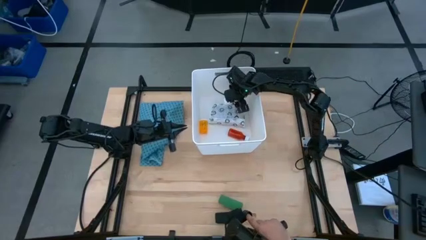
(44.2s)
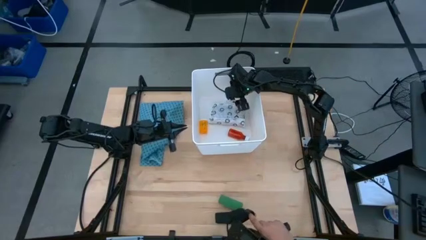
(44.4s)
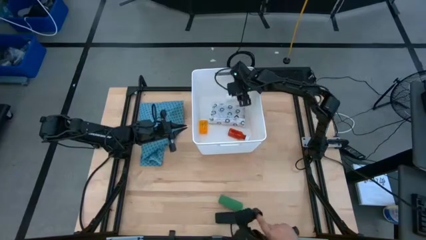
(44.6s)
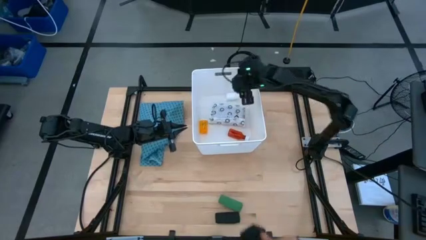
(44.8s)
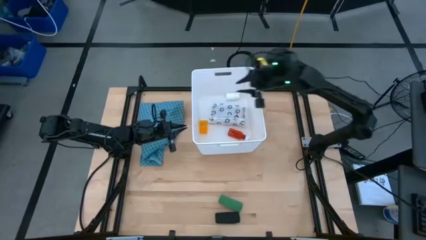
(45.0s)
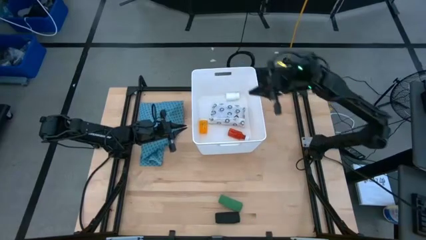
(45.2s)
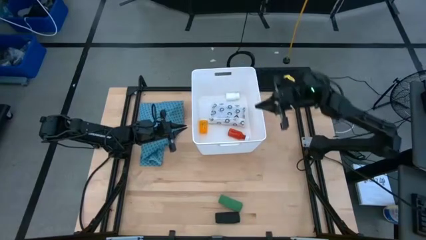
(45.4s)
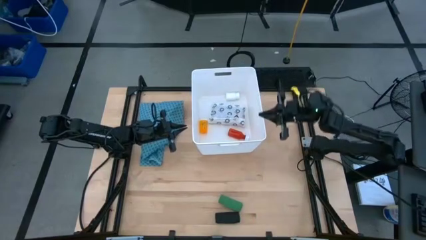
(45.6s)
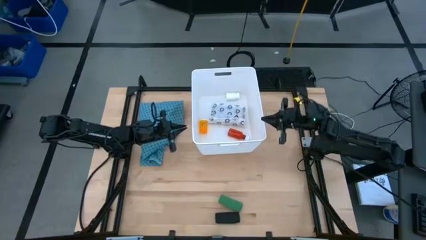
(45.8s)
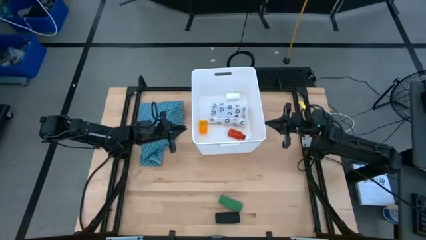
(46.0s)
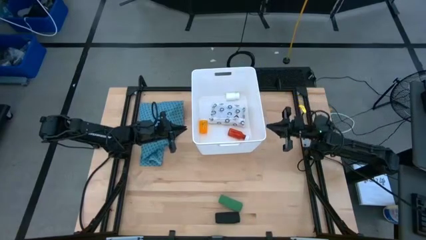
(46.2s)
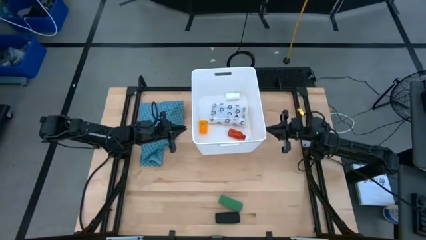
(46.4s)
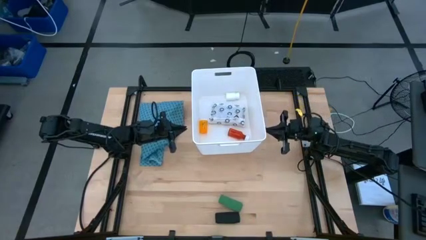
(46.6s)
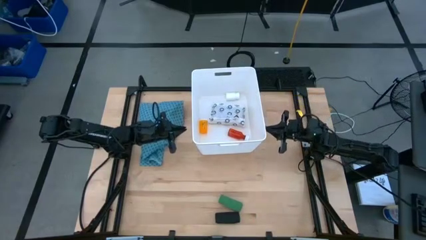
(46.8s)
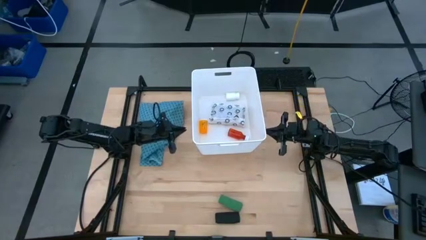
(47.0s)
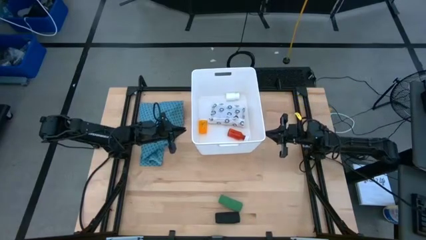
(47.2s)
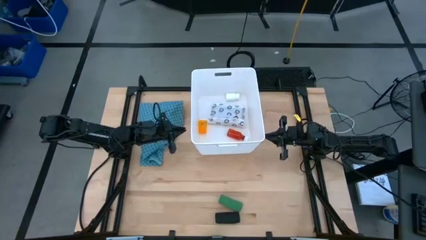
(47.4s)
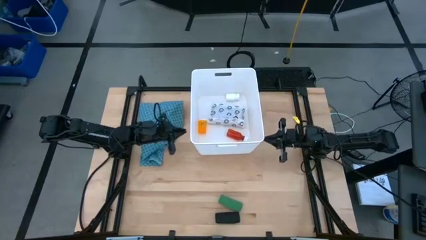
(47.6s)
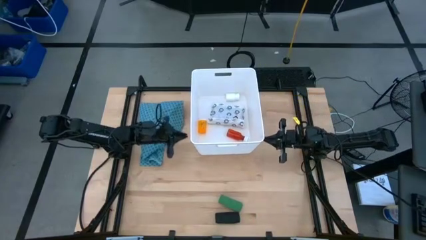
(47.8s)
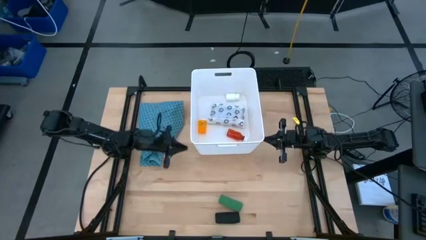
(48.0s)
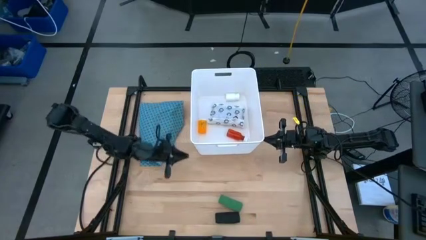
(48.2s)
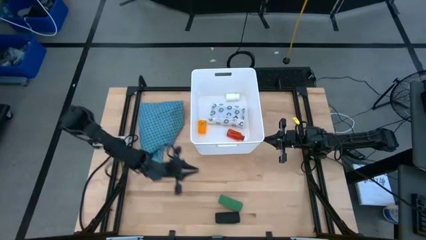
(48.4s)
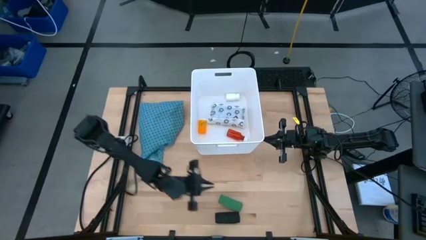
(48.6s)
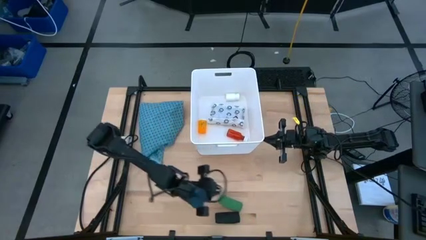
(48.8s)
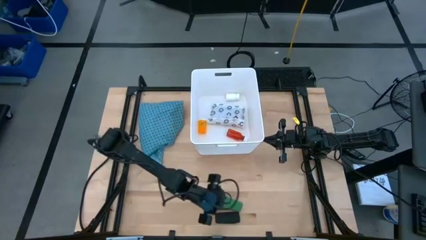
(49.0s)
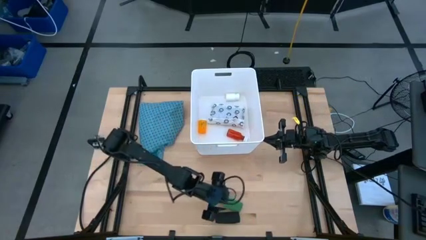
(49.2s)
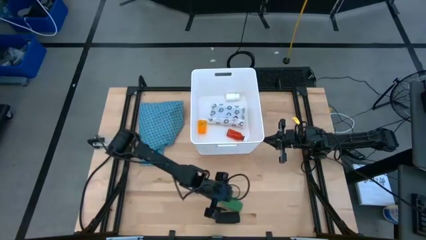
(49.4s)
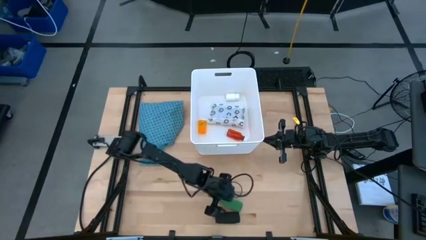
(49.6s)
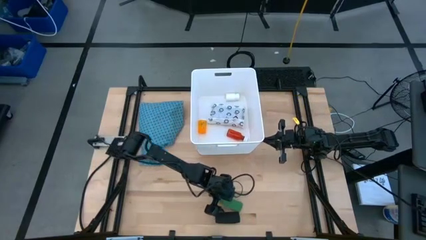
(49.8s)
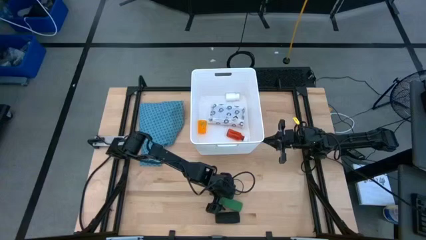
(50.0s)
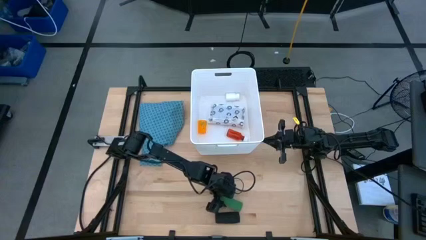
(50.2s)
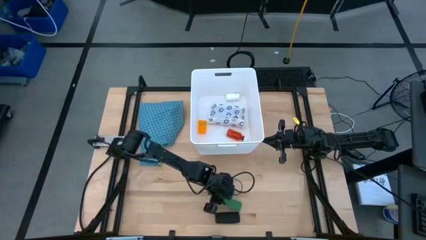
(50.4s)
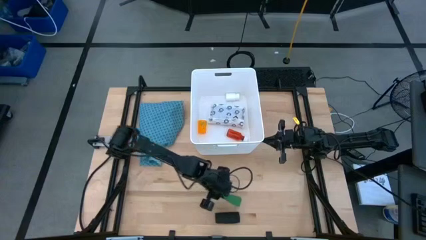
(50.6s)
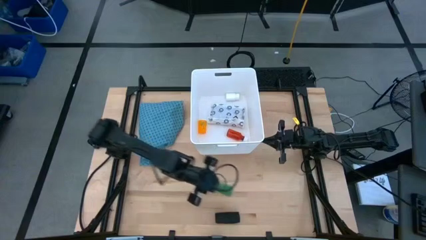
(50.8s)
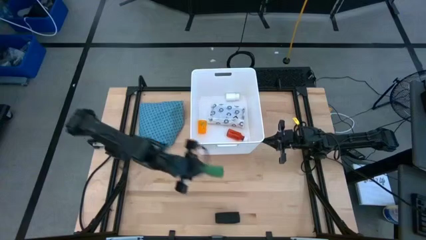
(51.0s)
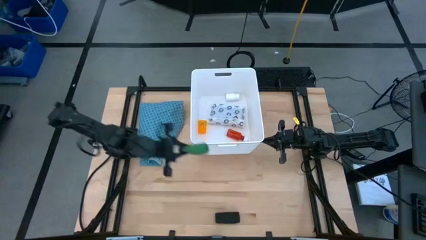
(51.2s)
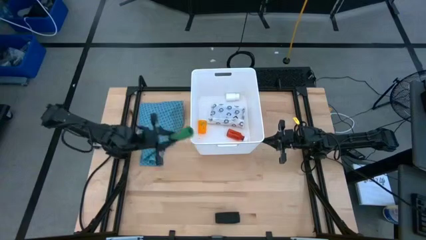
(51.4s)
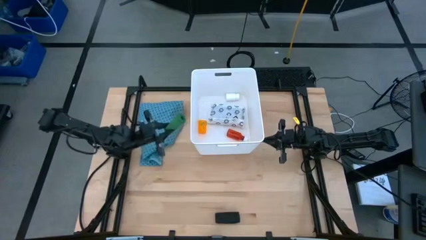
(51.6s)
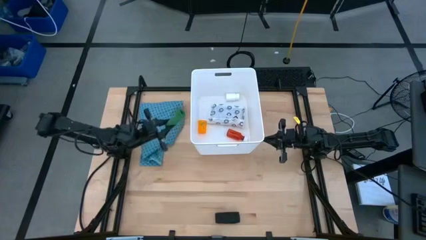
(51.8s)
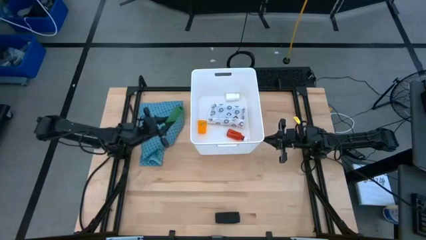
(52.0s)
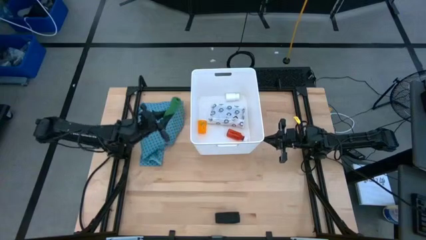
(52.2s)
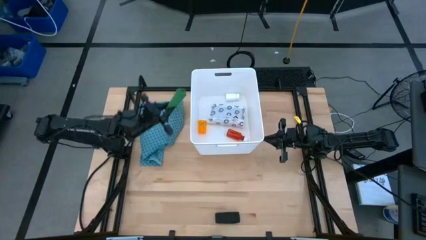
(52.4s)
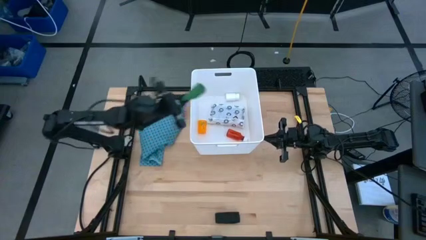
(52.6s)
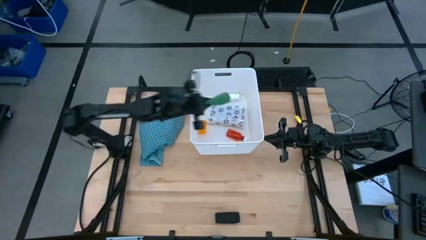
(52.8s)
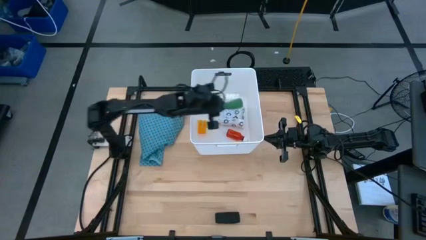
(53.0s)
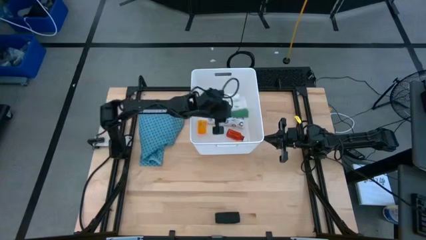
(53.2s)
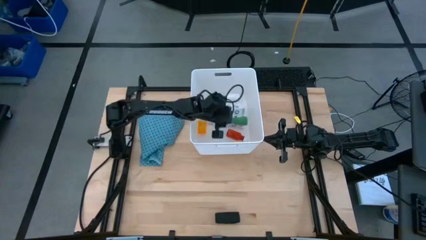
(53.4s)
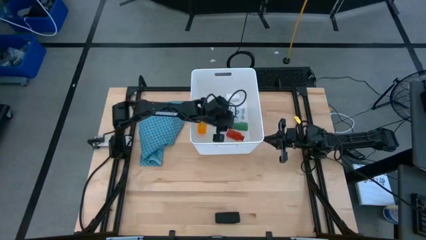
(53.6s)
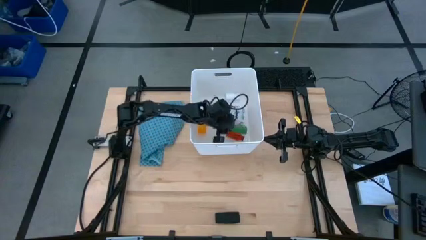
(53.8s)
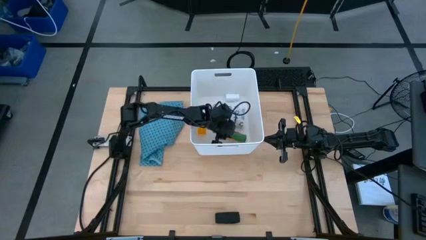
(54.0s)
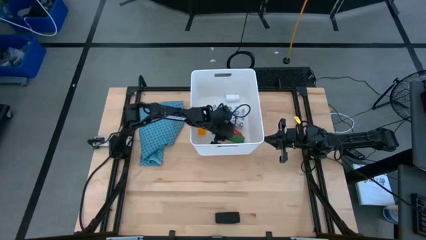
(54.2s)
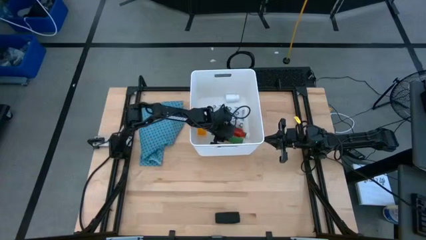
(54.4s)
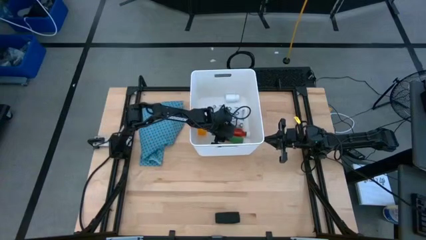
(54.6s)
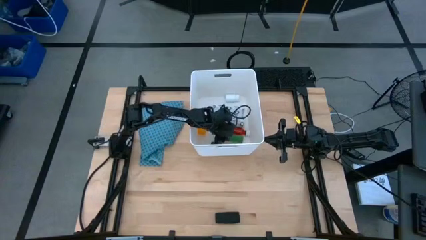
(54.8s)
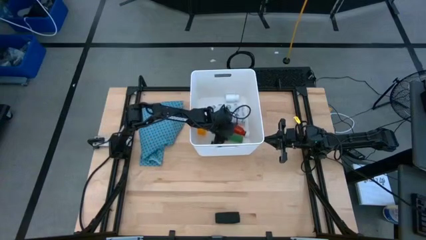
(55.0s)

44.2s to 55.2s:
Task: Pick & place medical supplies in basket/bin
Put the green rolled bandage in the white bin

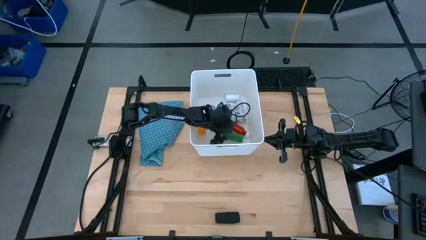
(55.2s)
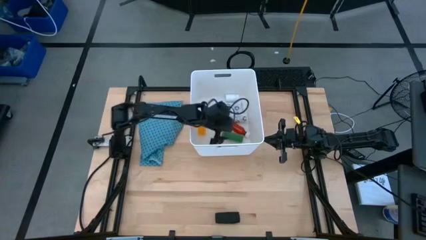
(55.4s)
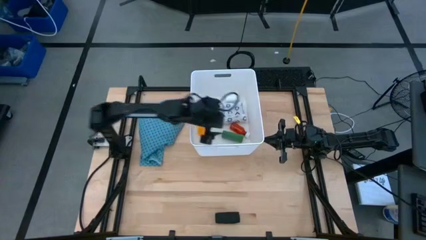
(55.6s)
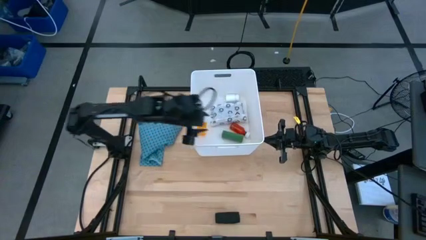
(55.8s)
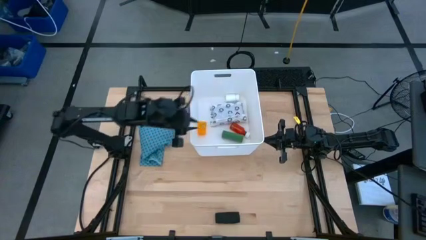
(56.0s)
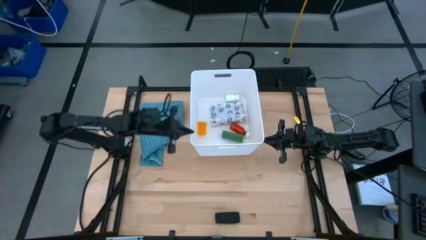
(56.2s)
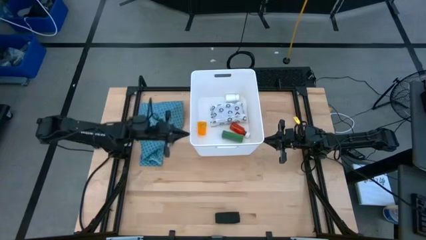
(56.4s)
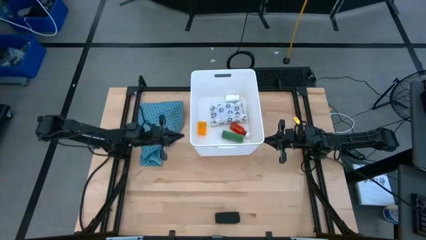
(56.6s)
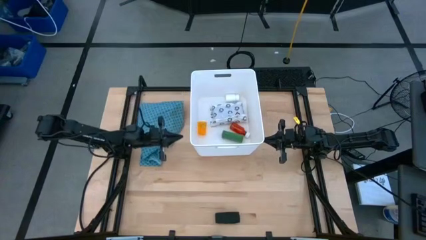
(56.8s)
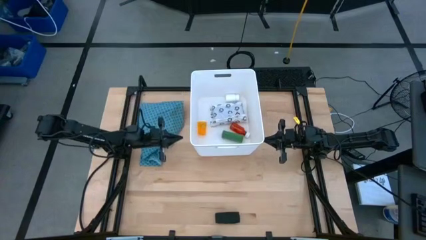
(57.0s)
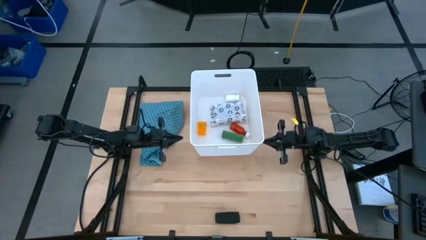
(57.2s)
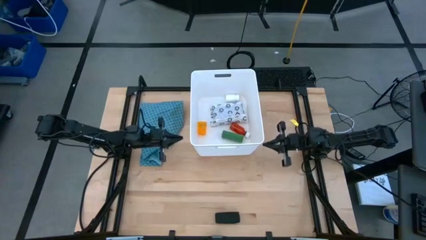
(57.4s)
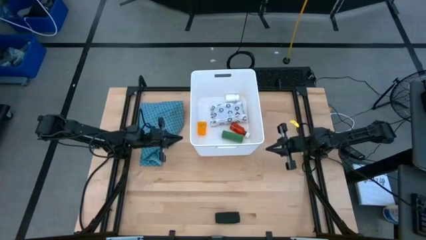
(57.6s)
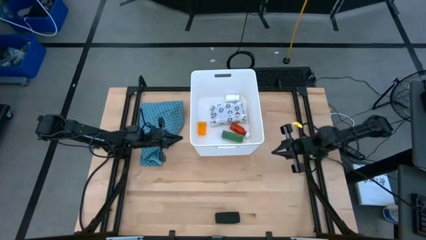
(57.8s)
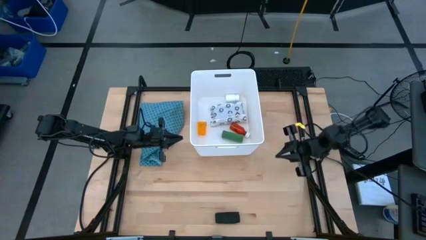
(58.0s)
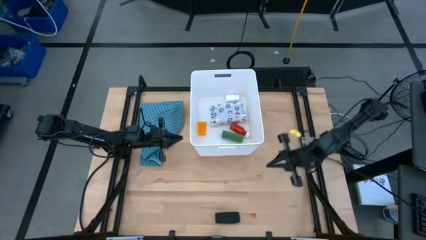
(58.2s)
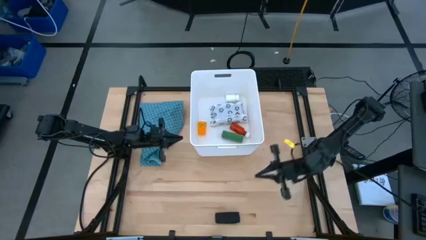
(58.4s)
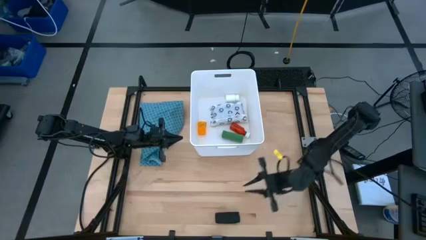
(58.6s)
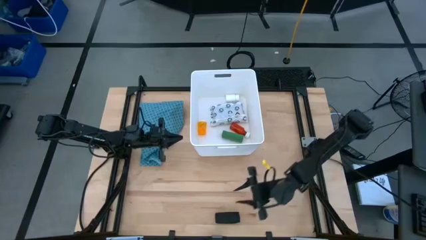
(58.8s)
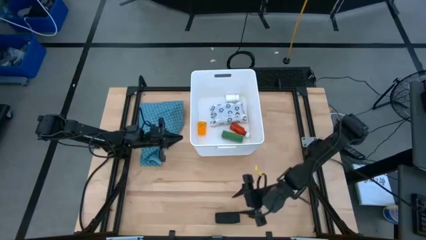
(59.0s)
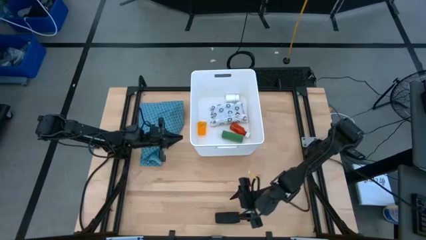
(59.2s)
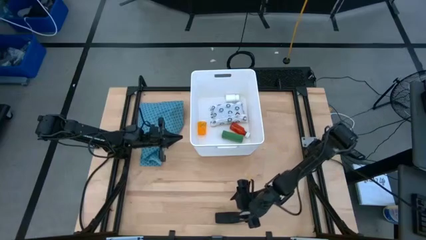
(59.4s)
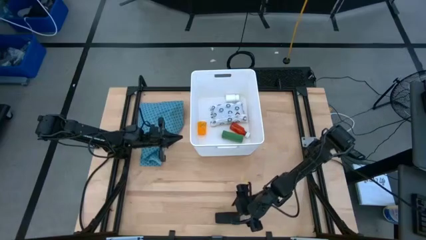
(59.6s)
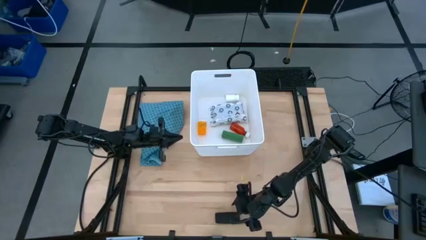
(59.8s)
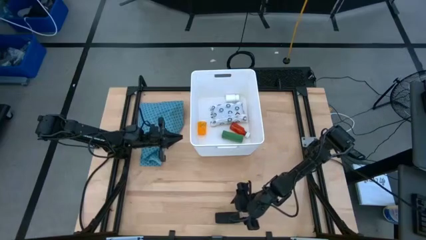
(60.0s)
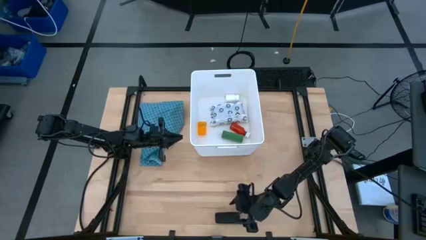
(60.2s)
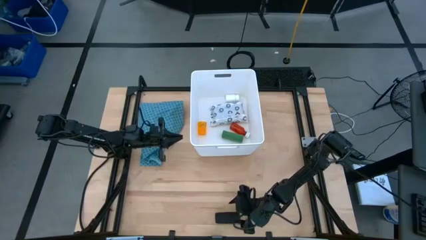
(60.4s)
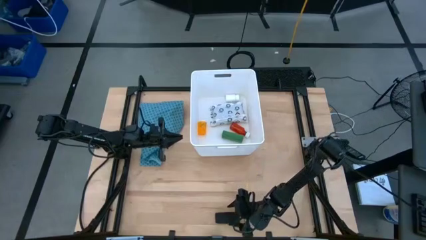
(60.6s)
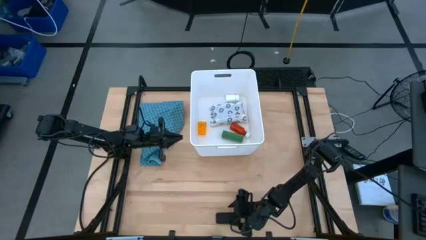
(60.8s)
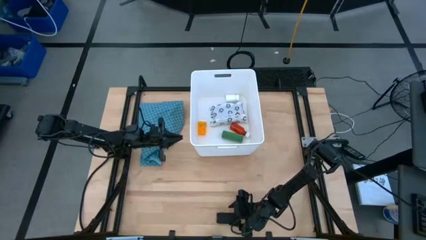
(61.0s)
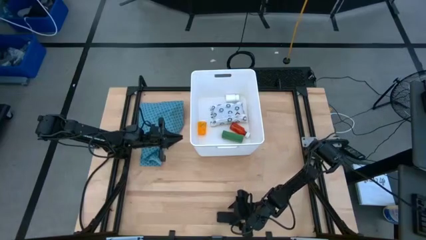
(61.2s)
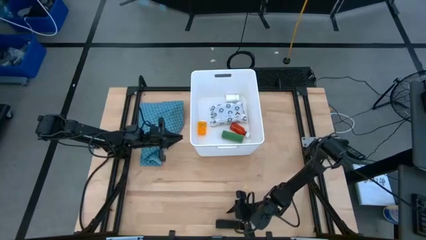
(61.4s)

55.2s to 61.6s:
Put the black rolled bandage in the white bin
